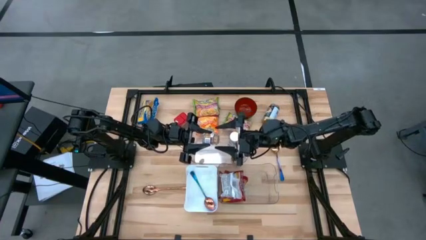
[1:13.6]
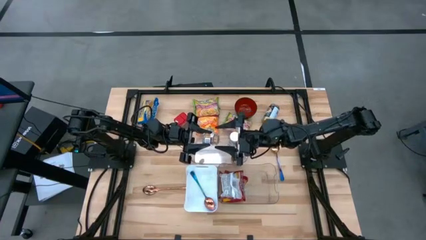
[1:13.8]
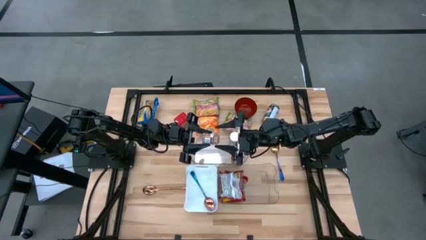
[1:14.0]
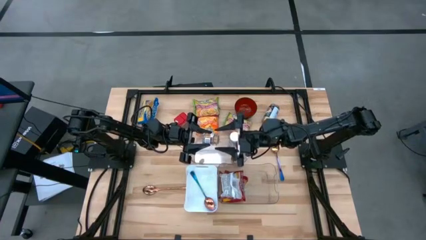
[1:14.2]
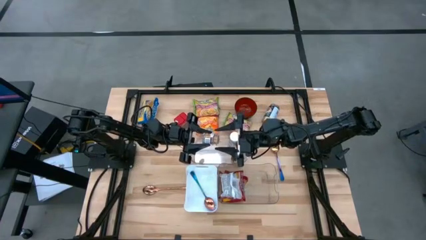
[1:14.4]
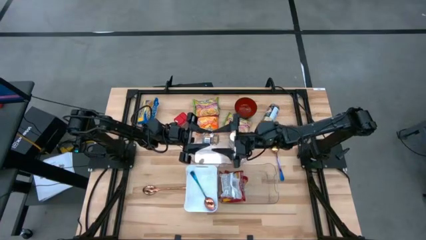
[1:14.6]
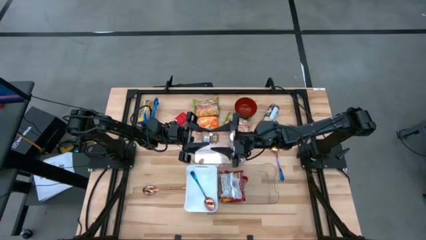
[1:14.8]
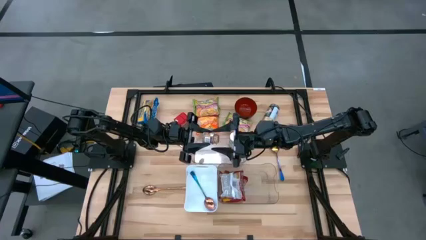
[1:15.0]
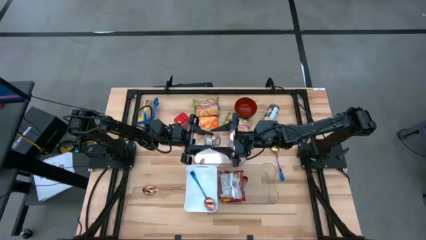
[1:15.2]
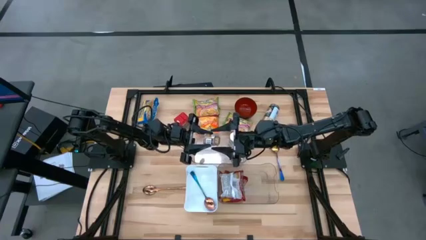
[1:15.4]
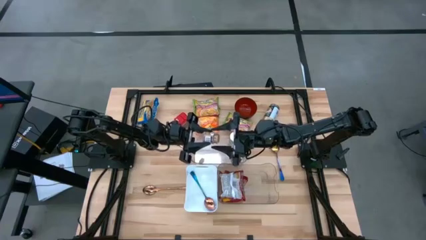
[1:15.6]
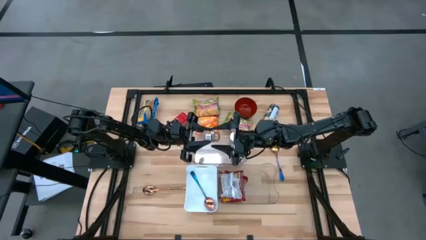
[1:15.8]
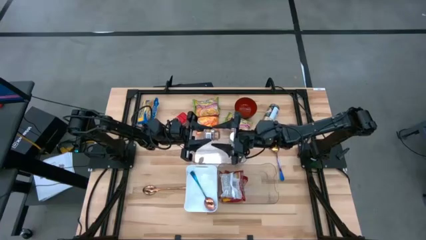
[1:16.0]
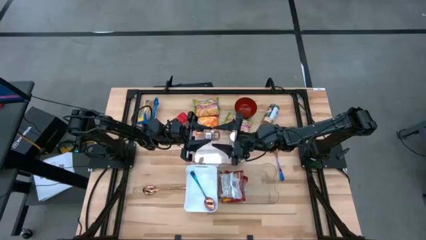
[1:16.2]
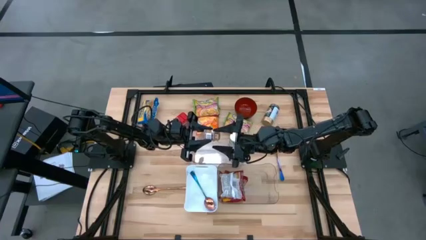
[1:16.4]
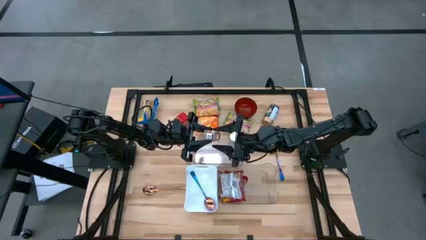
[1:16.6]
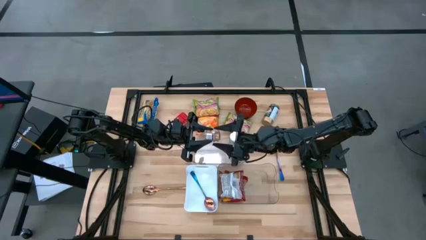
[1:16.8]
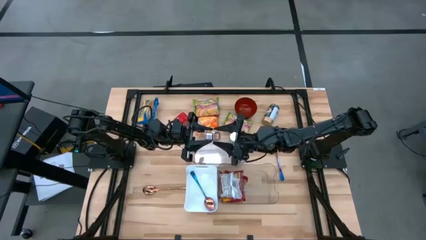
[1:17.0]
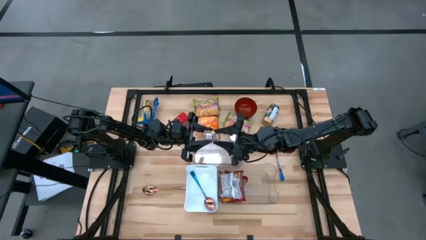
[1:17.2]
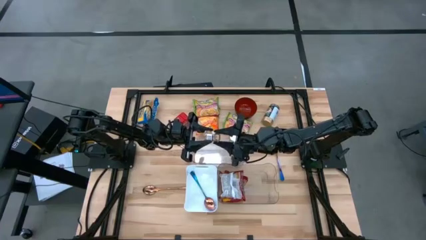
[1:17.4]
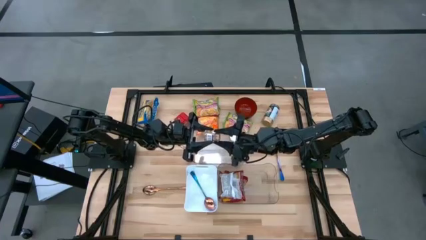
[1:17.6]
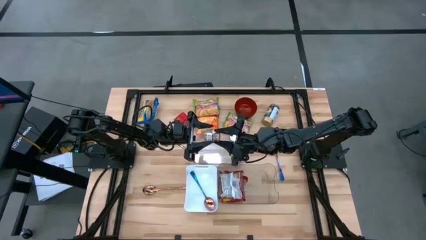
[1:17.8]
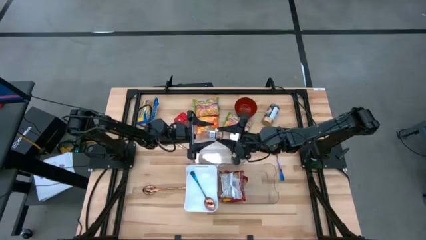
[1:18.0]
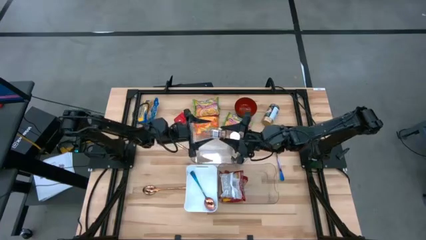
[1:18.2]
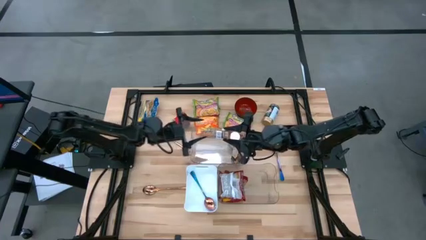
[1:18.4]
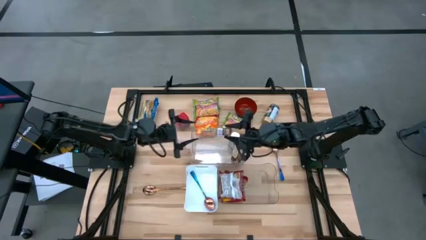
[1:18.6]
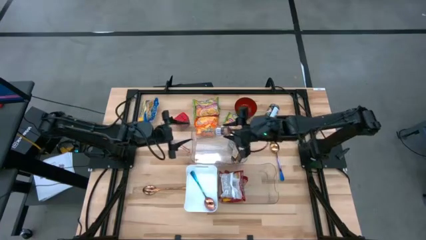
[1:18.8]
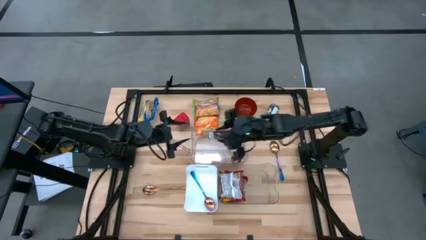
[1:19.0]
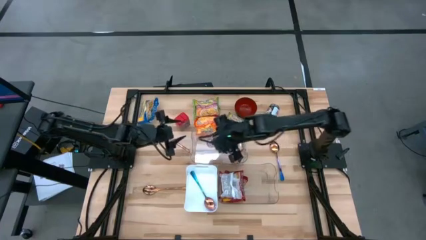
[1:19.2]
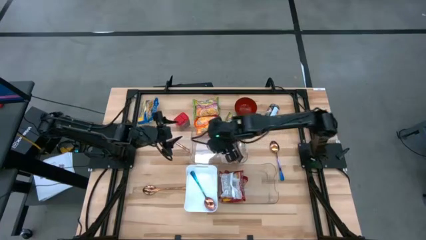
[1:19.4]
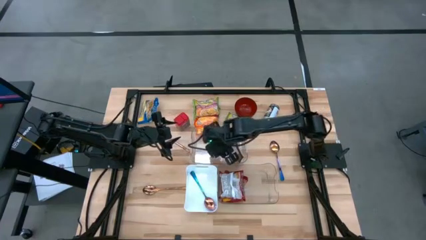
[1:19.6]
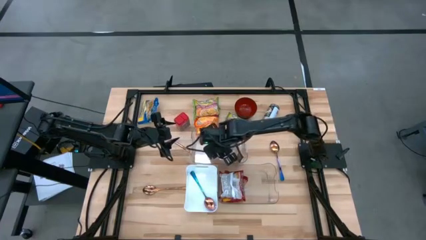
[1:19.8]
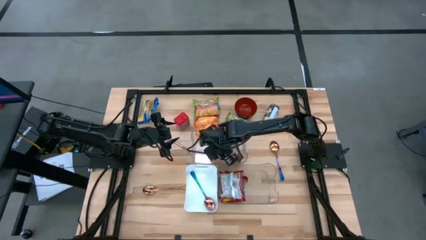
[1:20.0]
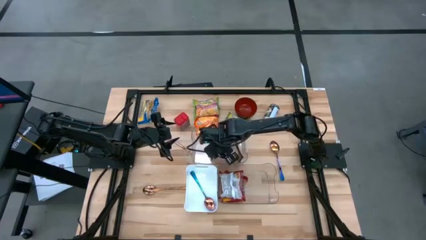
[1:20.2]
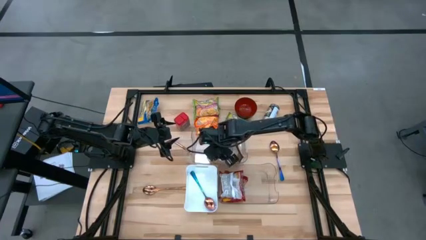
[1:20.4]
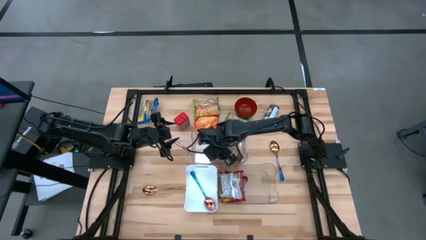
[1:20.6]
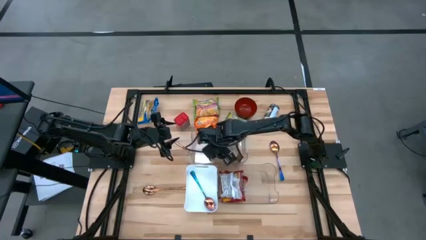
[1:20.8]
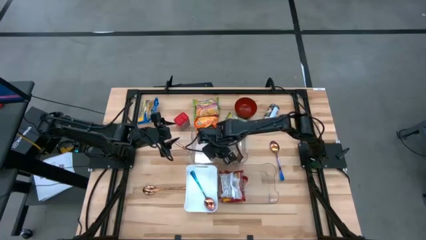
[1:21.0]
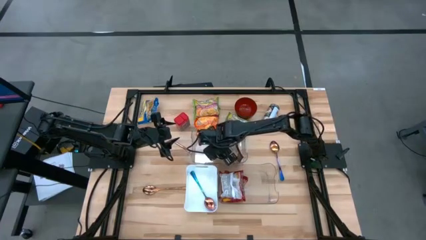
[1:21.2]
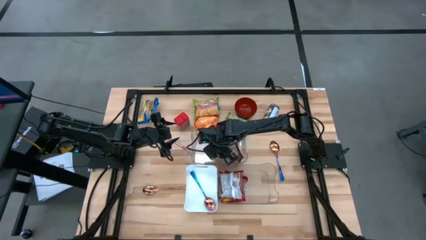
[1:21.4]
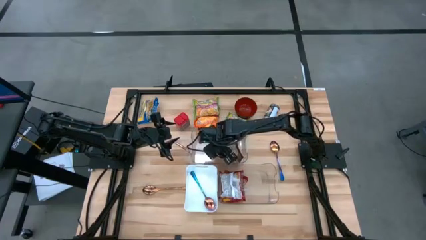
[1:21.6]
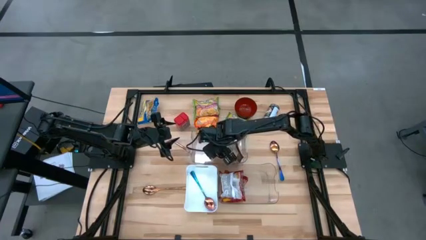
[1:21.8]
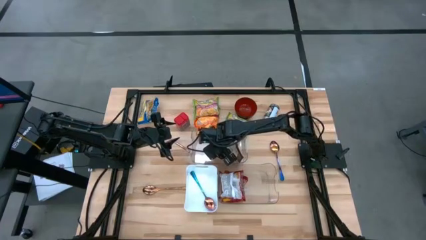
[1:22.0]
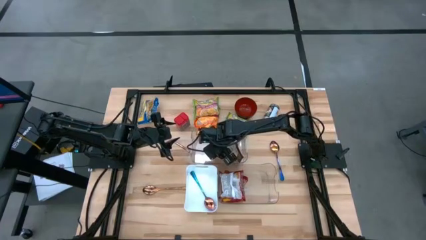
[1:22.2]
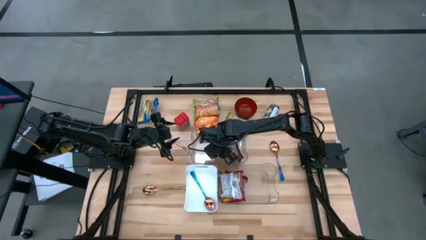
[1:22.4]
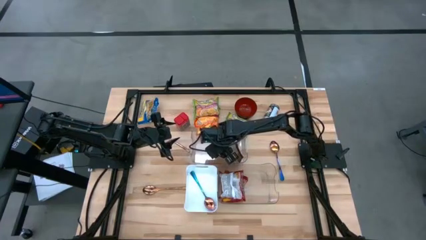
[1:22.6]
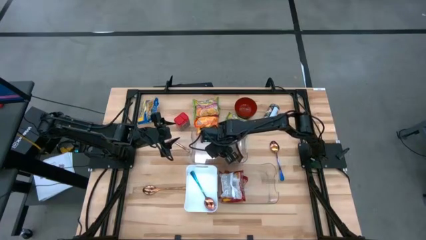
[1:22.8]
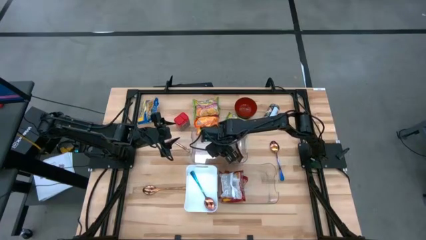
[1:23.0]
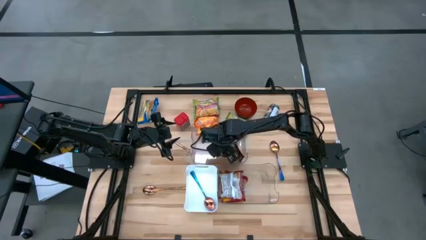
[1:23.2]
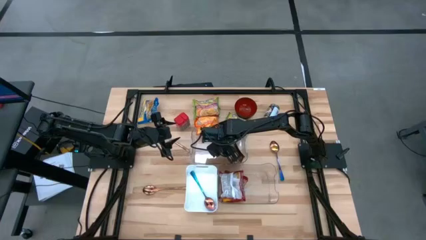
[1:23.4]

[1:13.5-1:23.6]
Task: Pick & Place Food Item
Put the brown spice bottle into the top transparent bin
